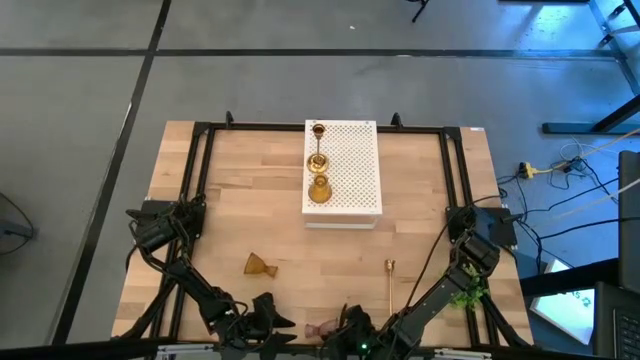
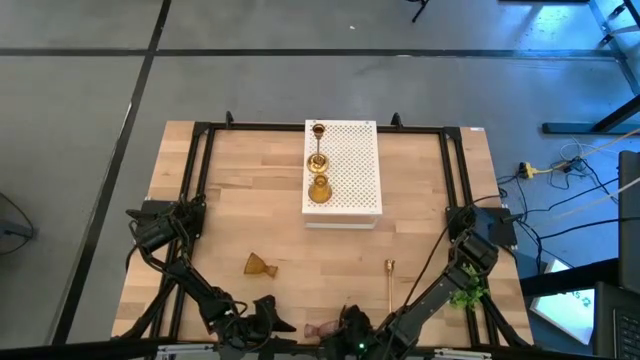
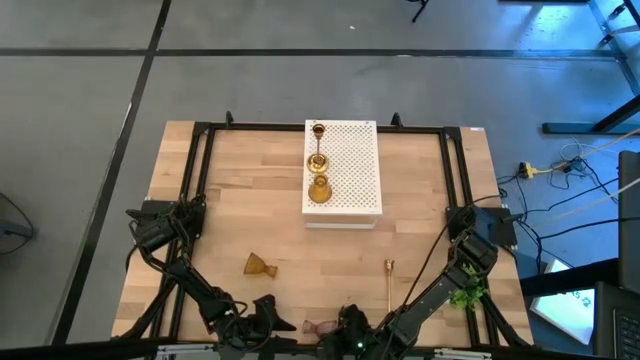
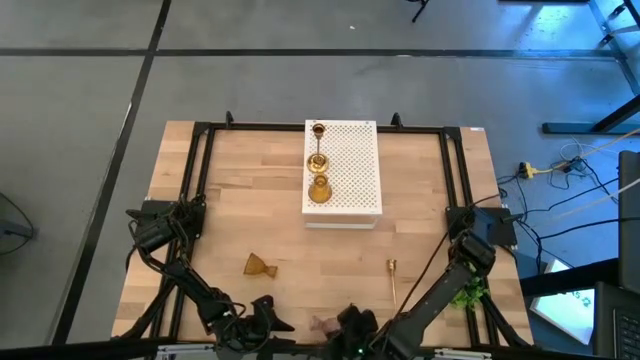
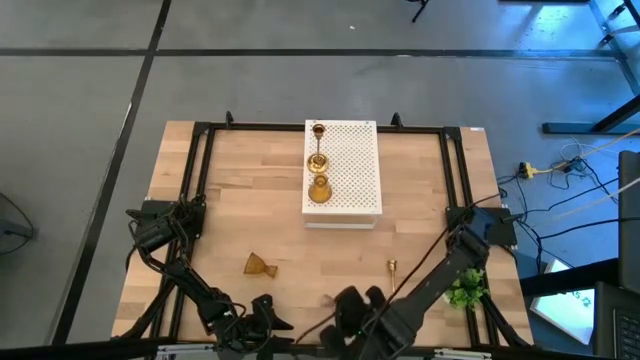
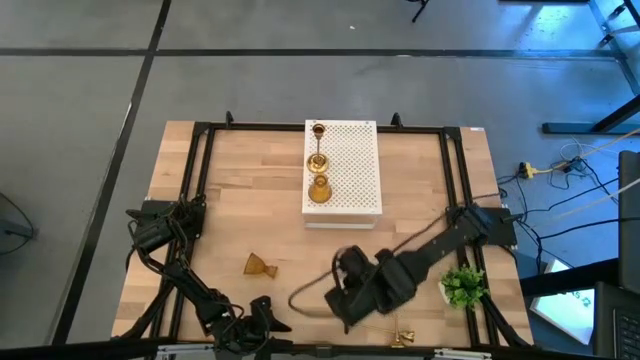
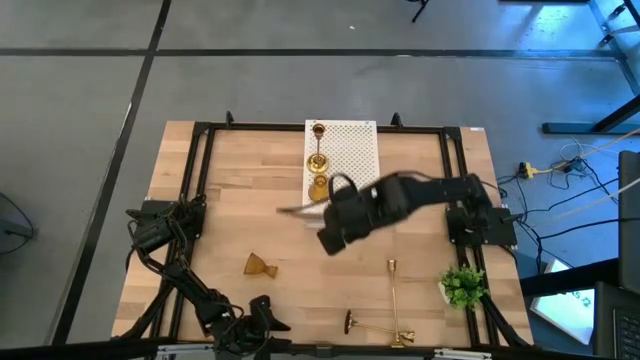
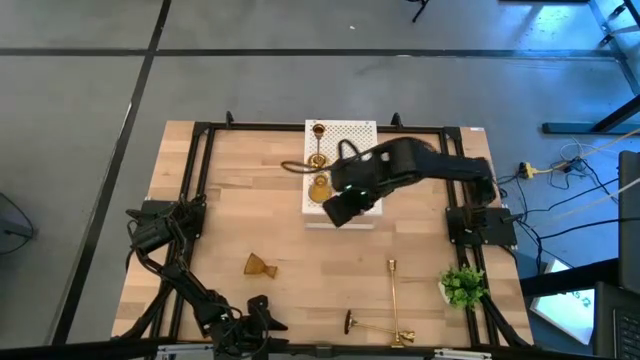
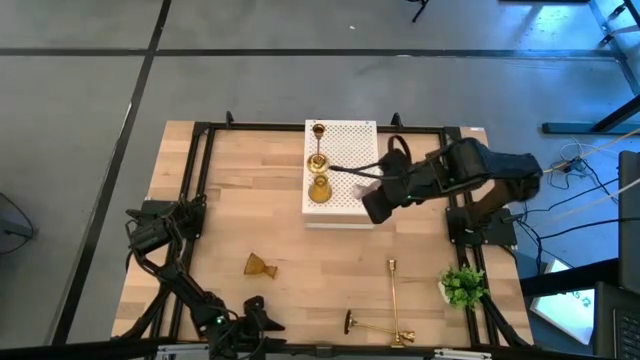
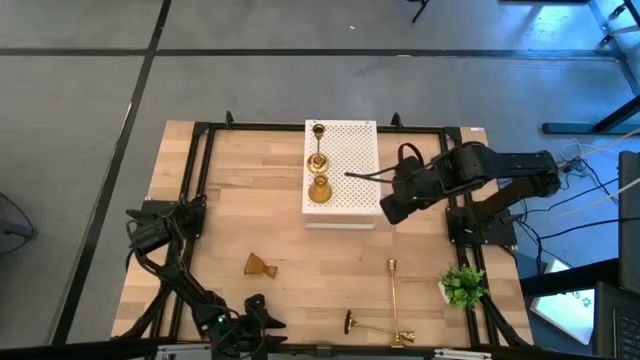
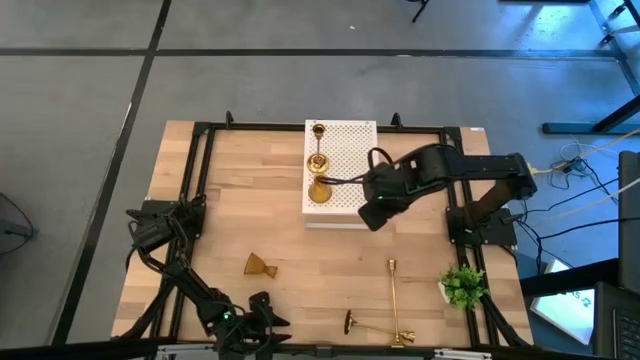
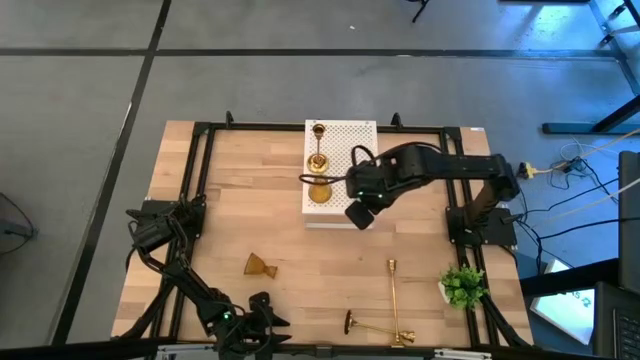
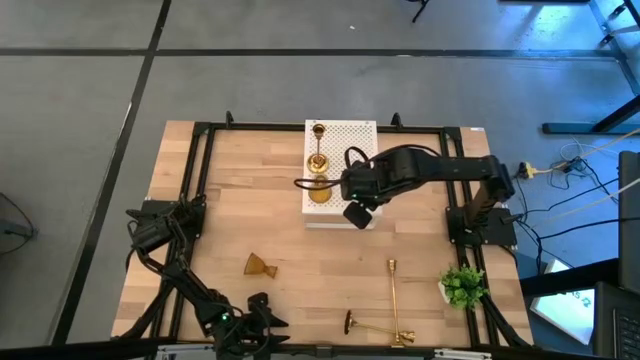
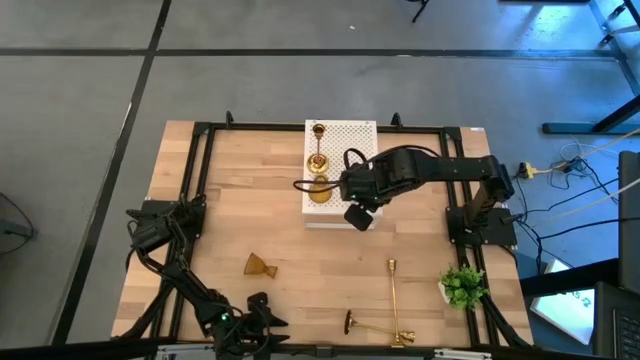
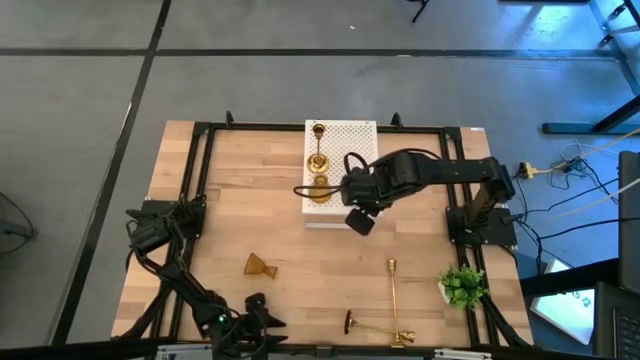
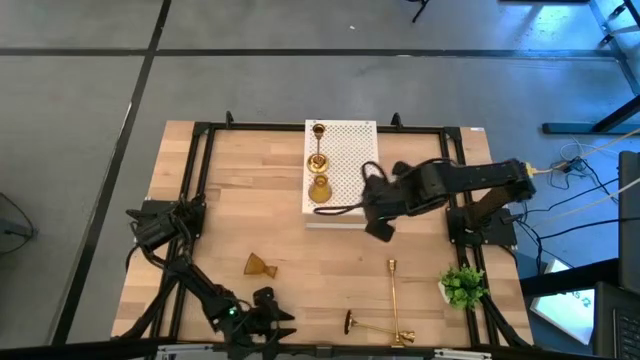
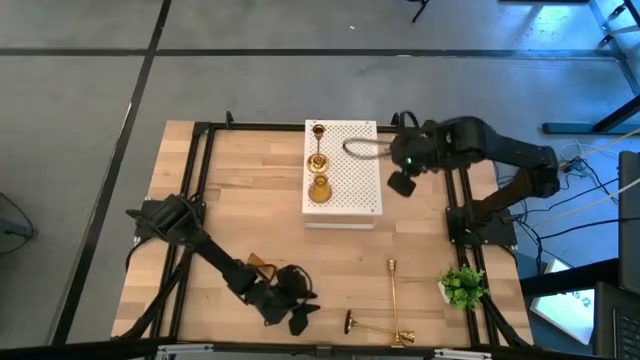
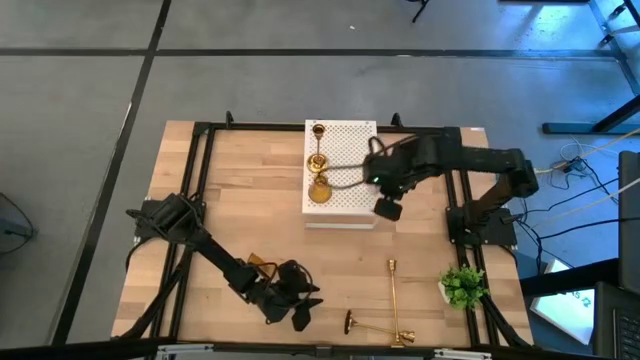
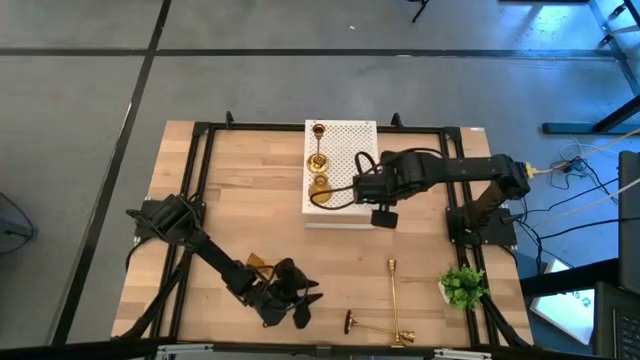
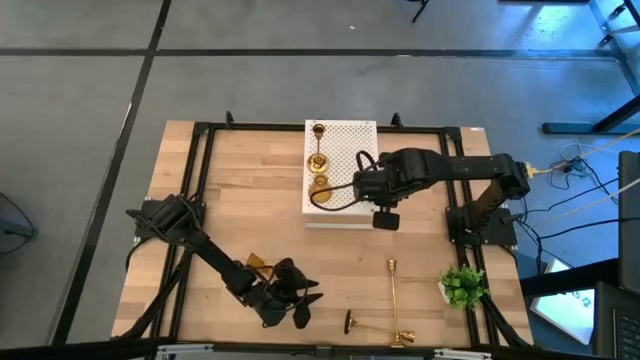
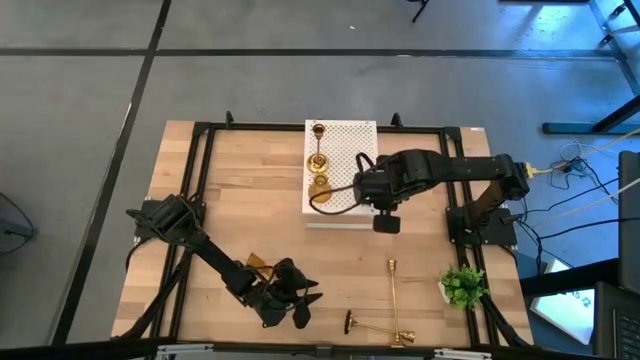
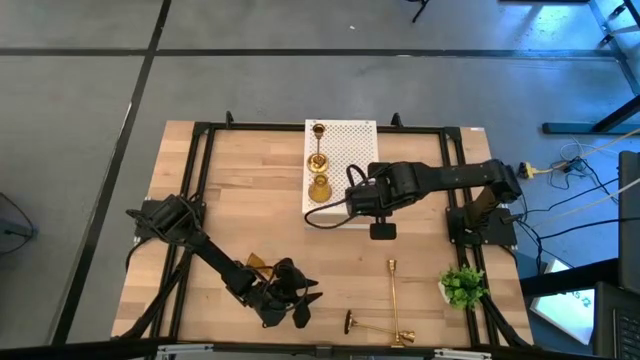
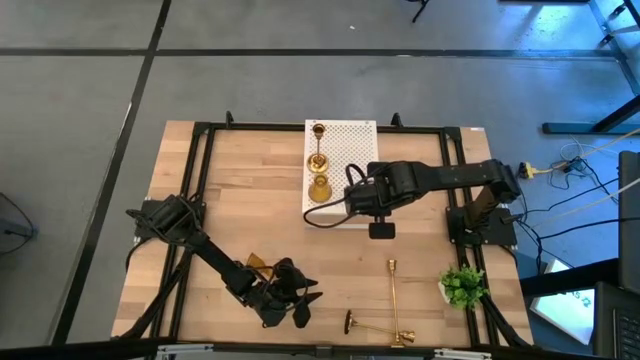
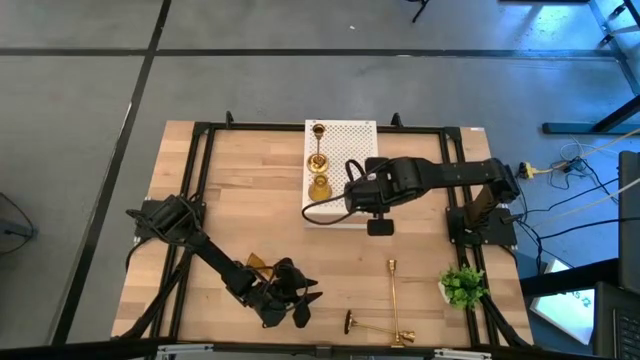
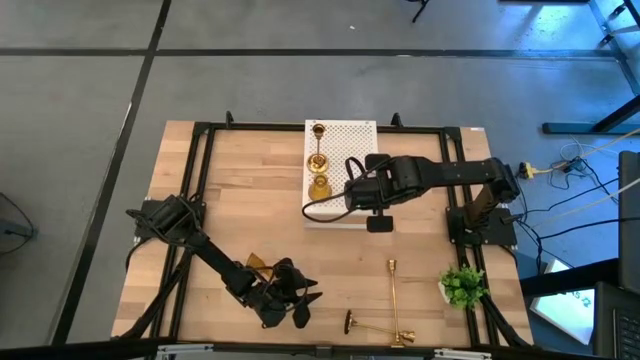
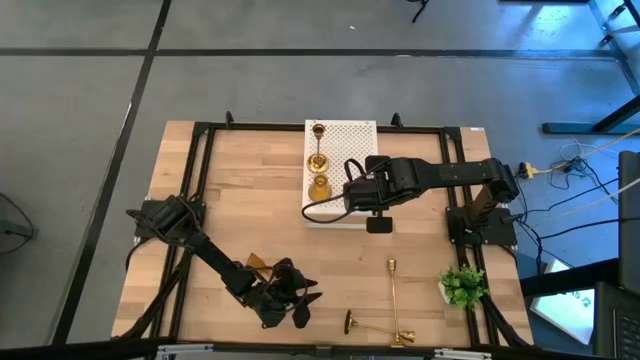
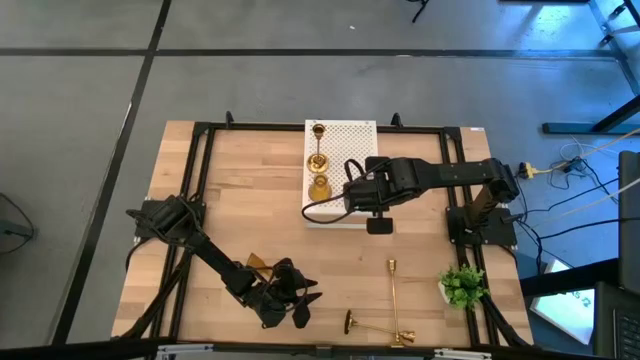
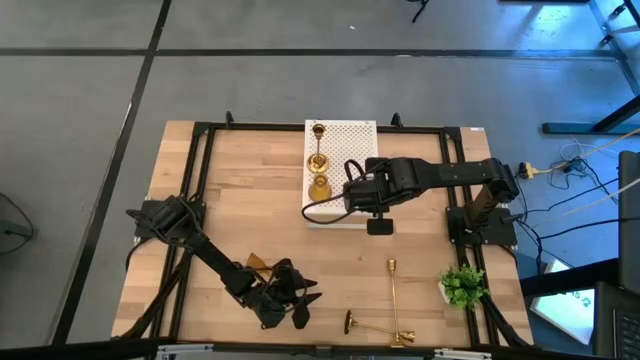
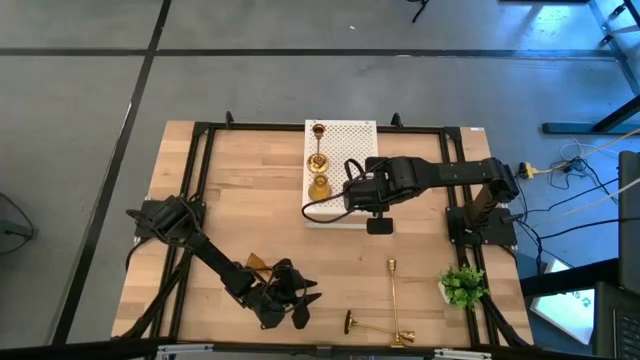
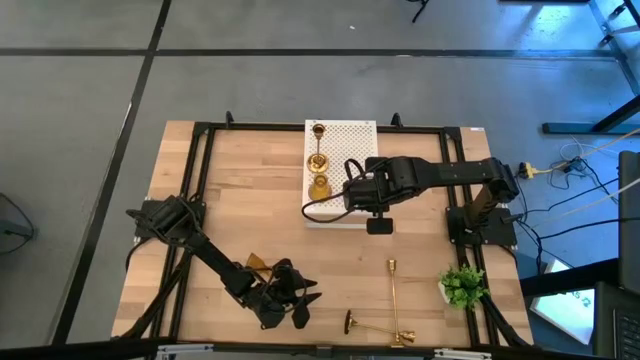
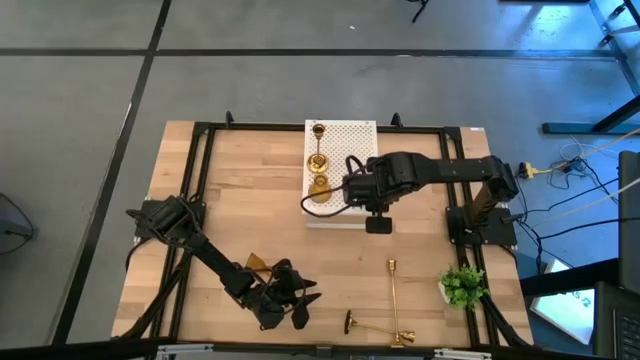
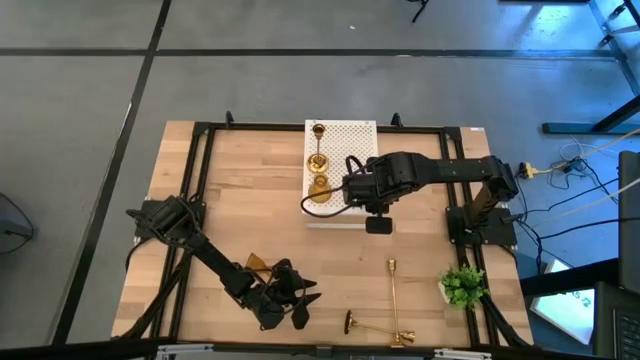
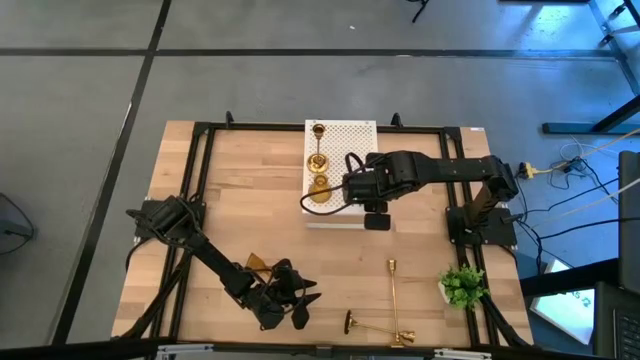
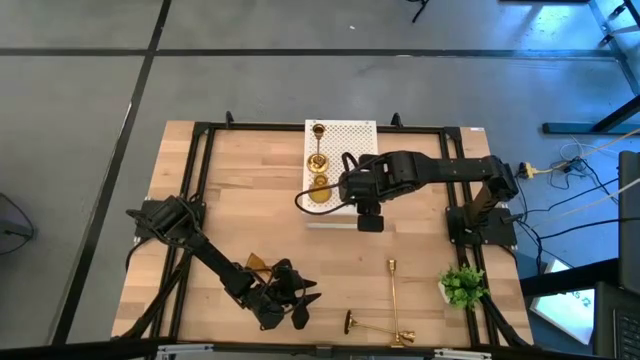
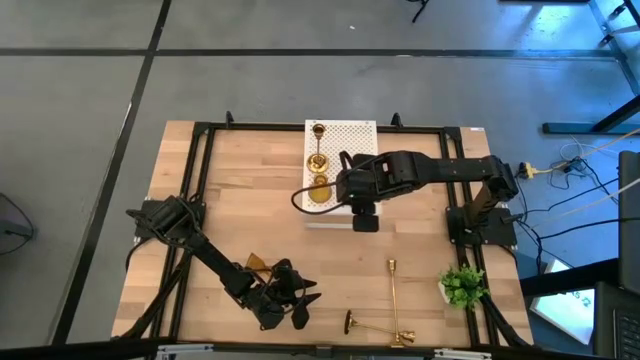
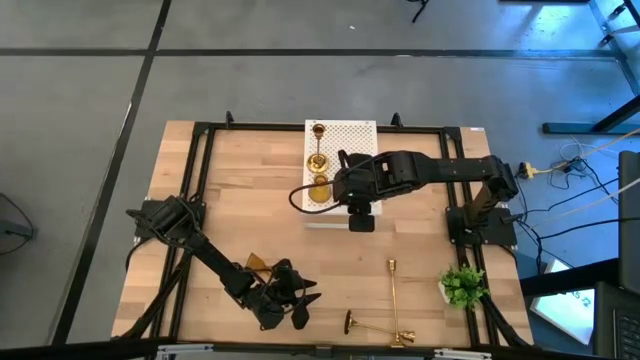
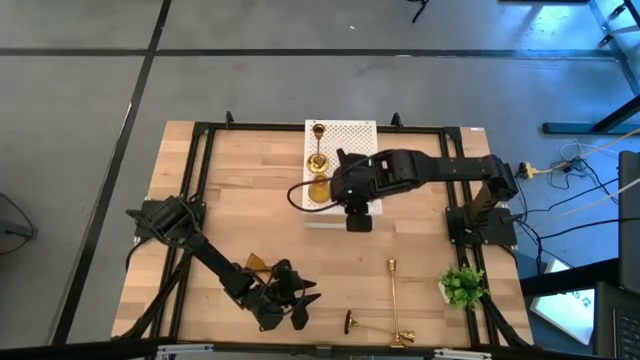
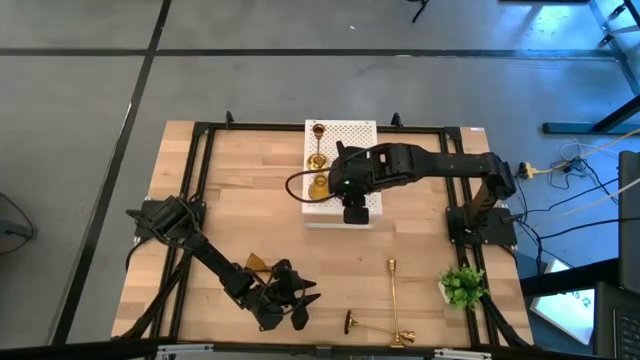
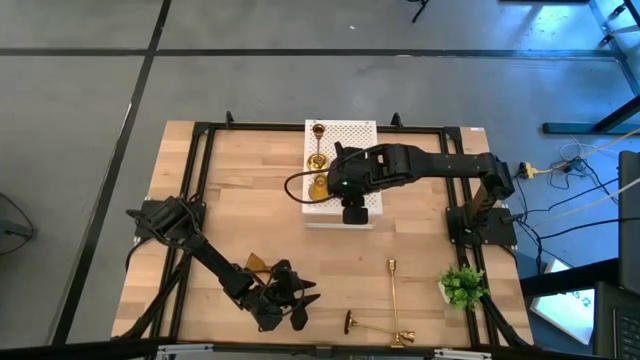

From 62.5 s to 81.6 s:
Task: Pick & Place candle stick holders
Put the pink candle holder on the shelf

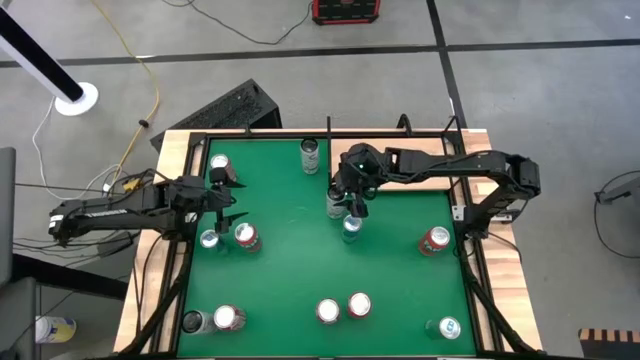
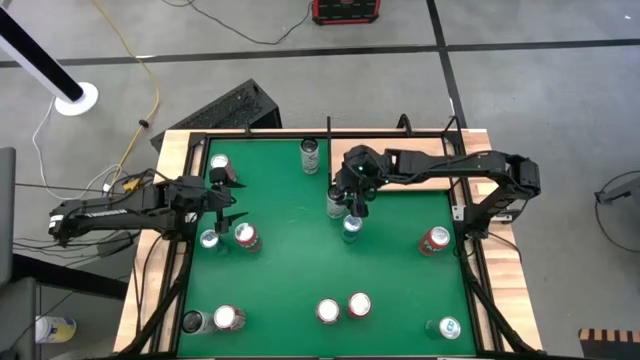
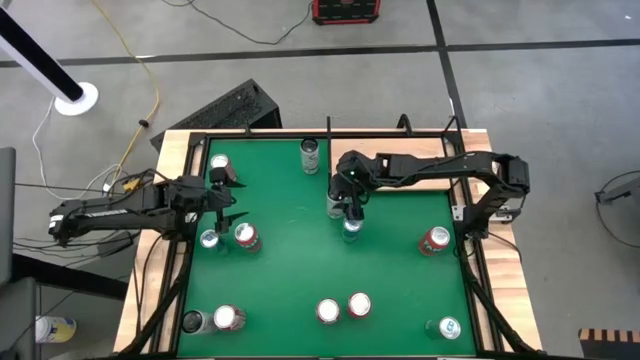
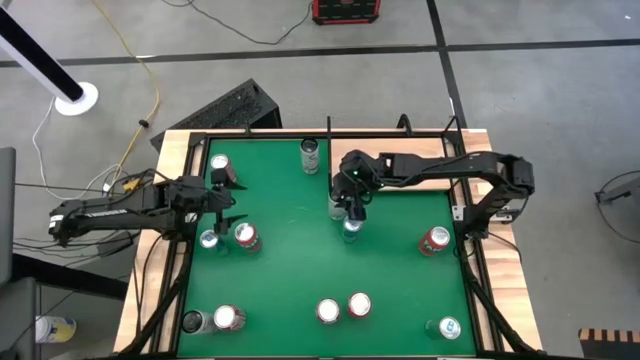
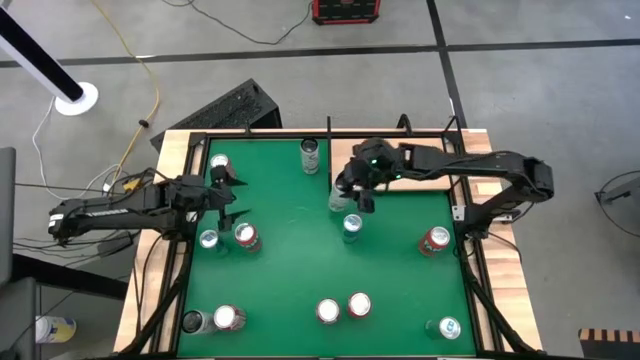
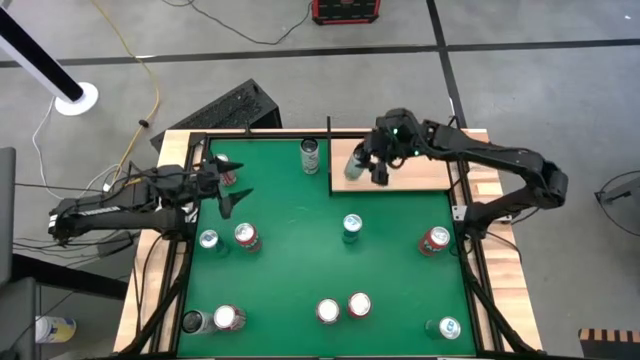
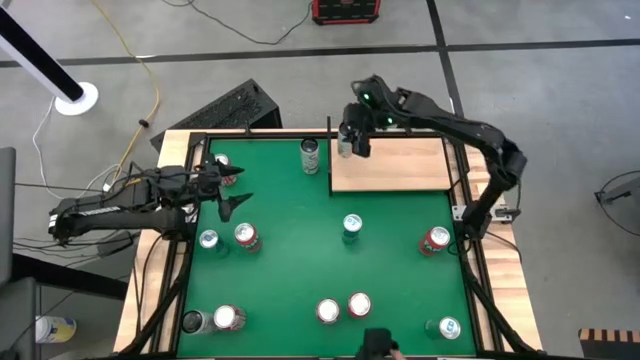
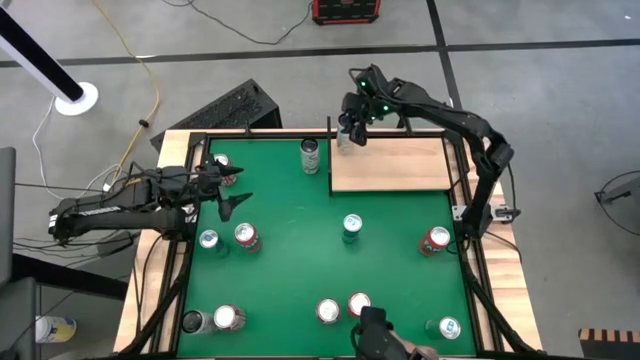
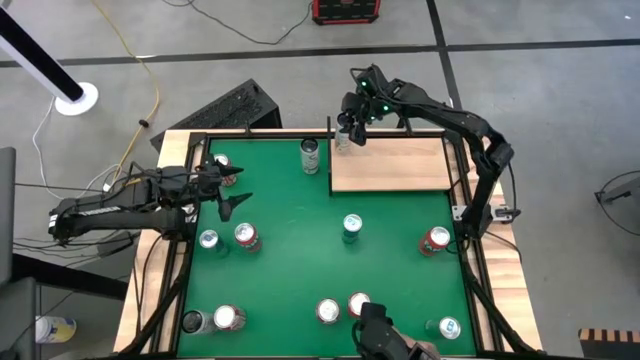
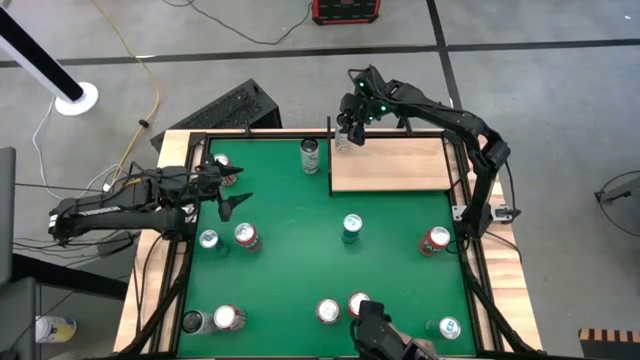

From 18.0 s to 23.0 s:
Task: Sort soda cans
Put the middle white soda can on the shelf
